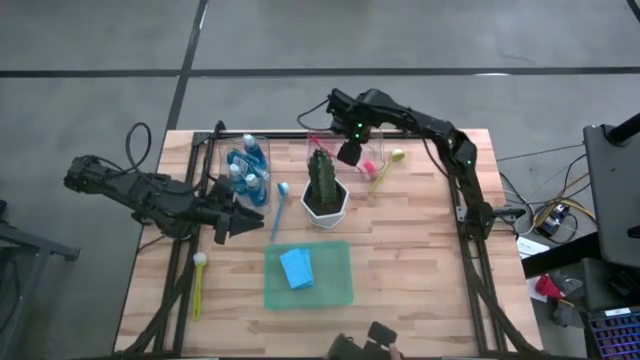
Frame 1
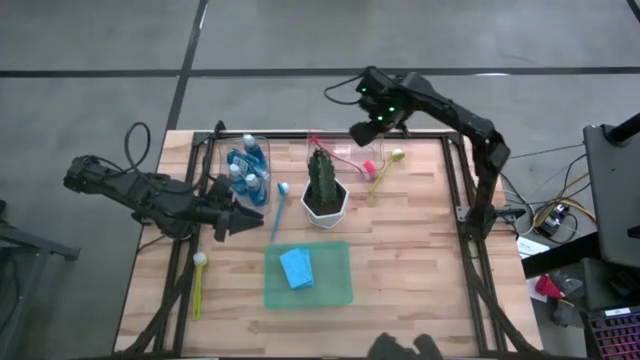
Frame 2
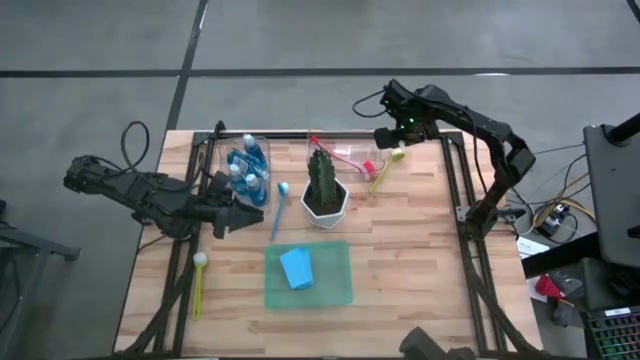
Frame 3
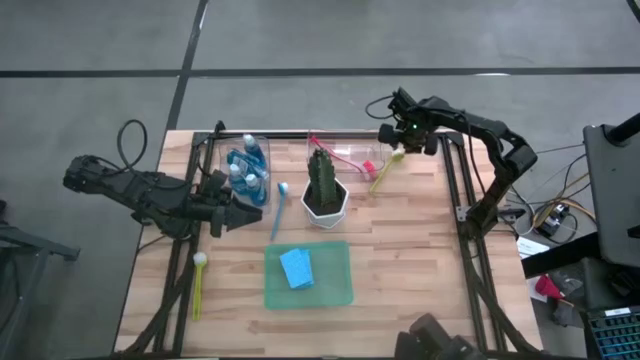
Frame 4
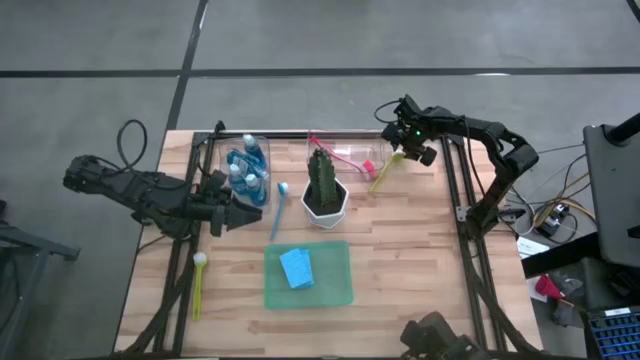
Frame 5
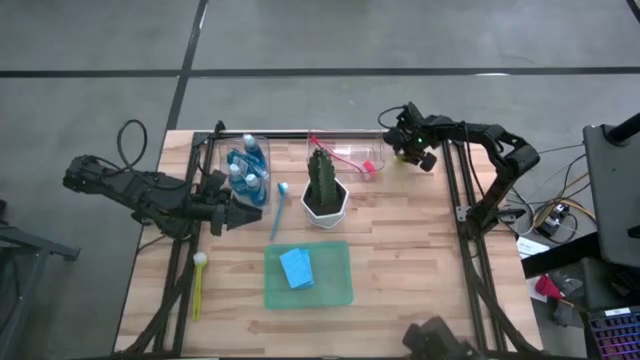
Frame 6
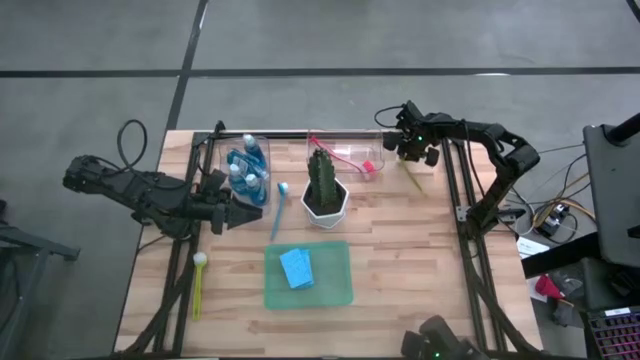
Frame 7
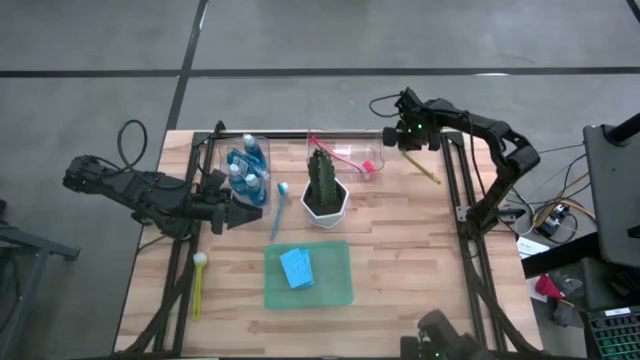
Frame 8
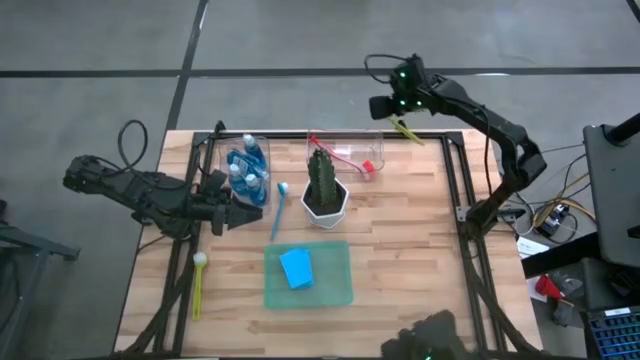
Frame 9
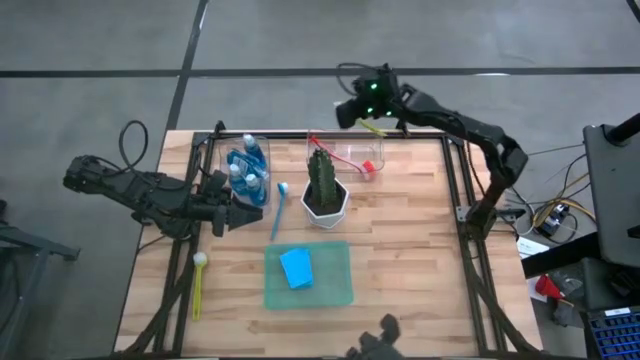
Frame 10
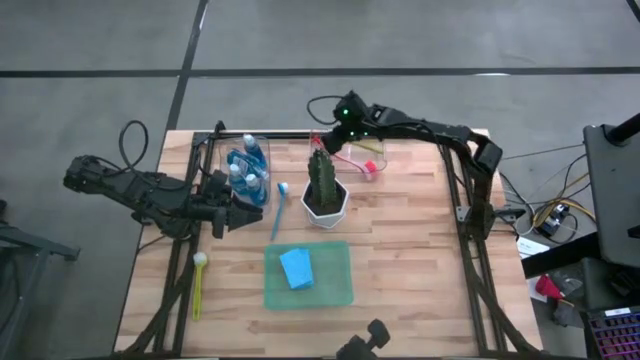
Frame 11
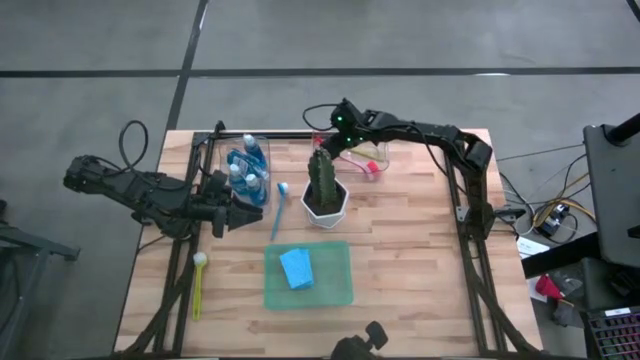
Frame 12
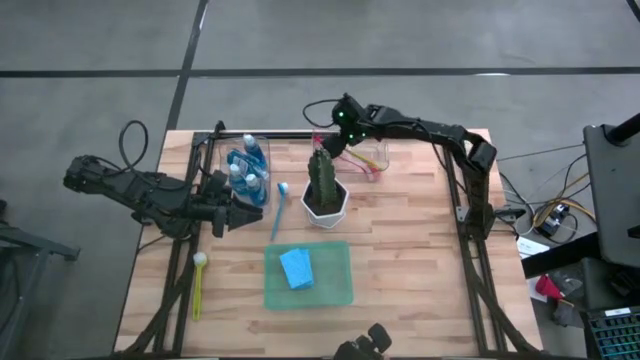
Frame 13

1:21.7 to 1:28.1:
Task: Pick & Place Kitchen Sink Supplies
Put the green dish brush into the right transparent bin

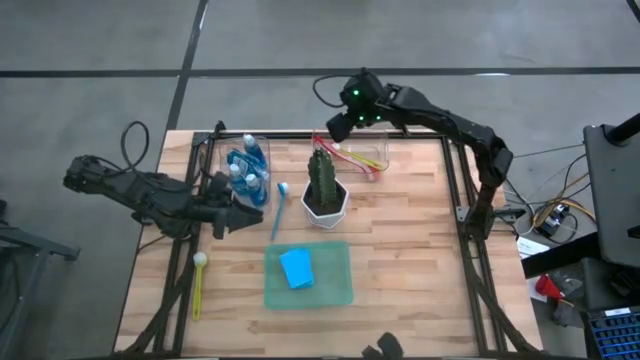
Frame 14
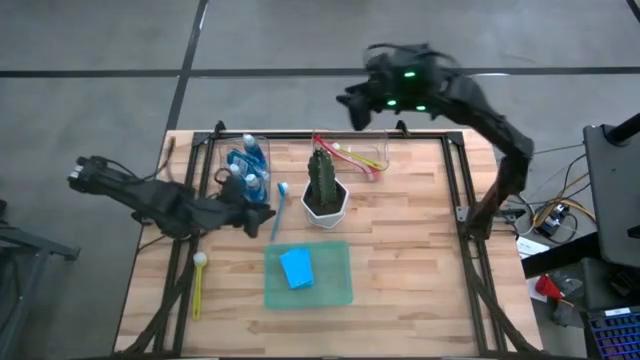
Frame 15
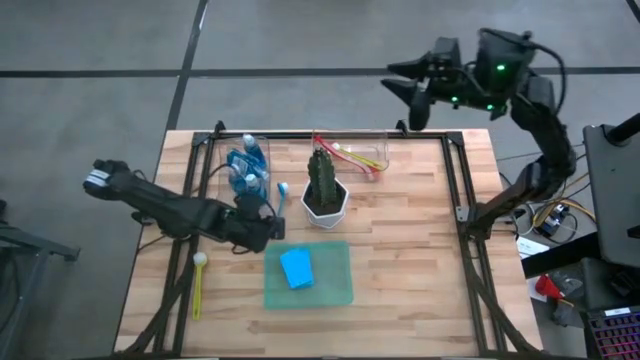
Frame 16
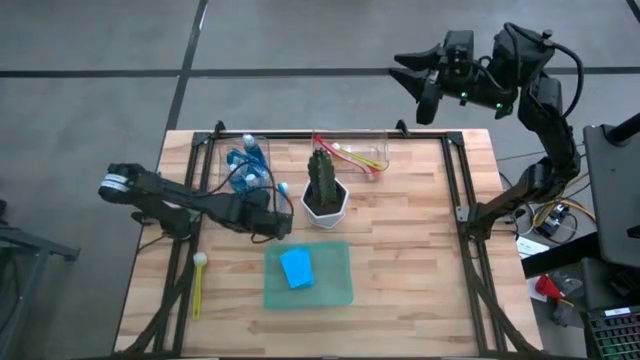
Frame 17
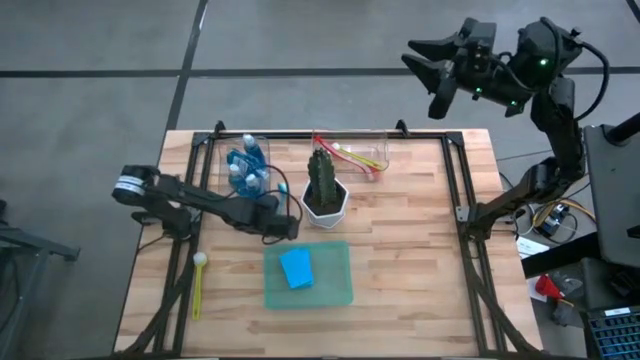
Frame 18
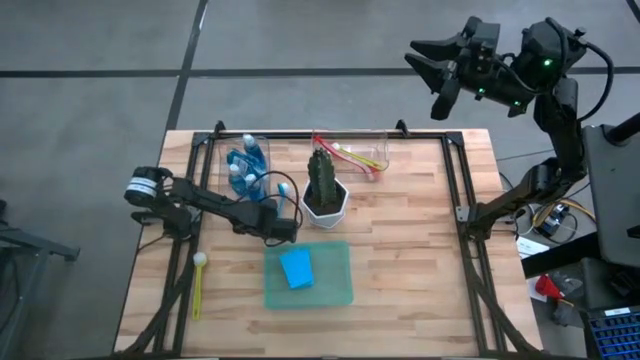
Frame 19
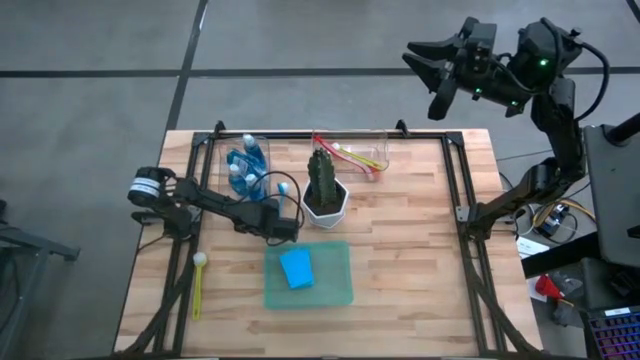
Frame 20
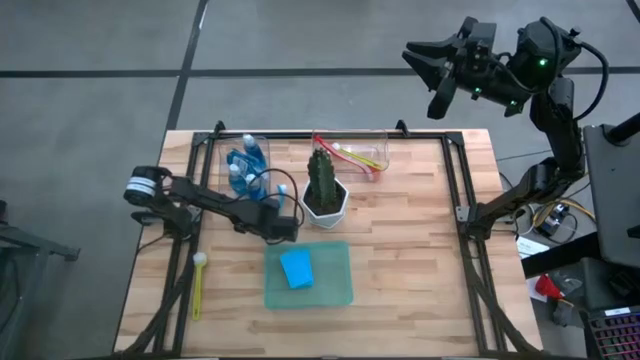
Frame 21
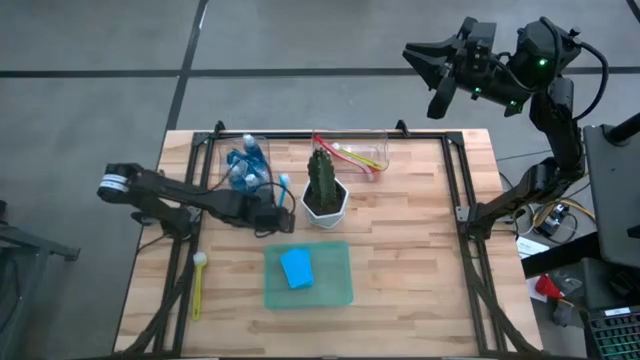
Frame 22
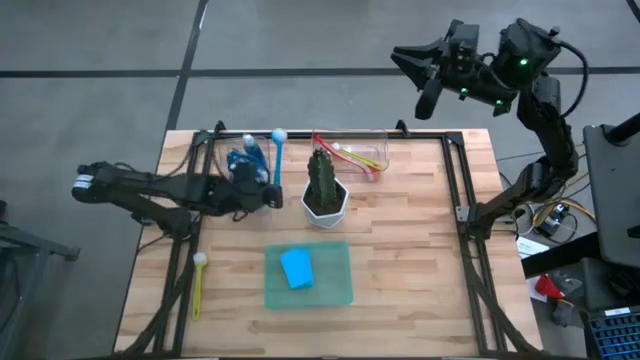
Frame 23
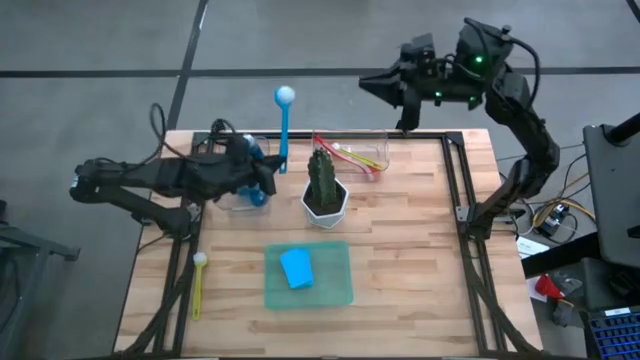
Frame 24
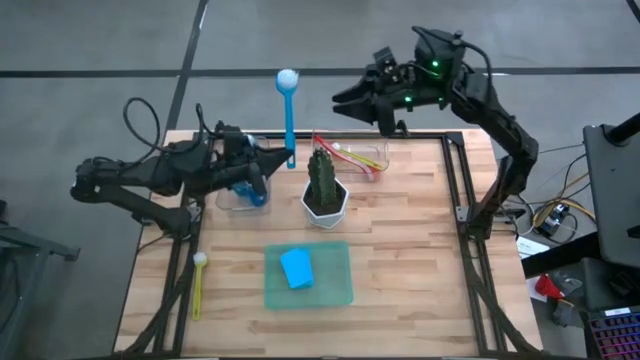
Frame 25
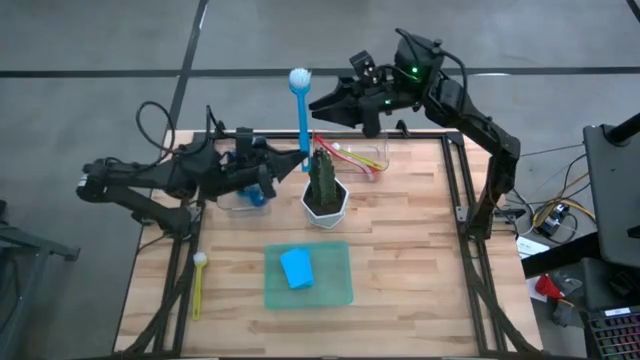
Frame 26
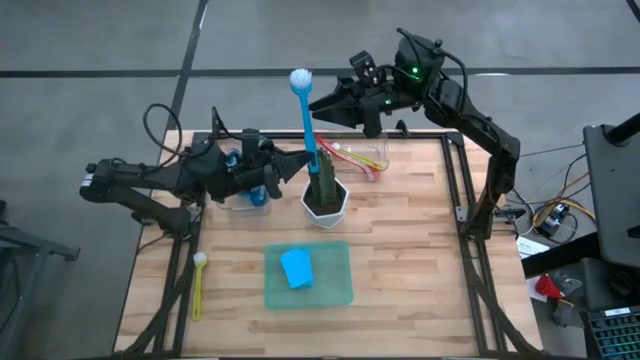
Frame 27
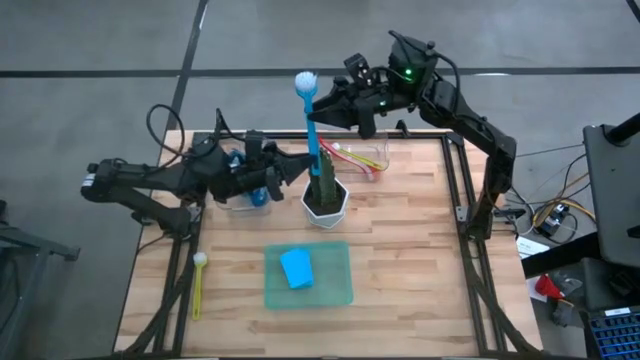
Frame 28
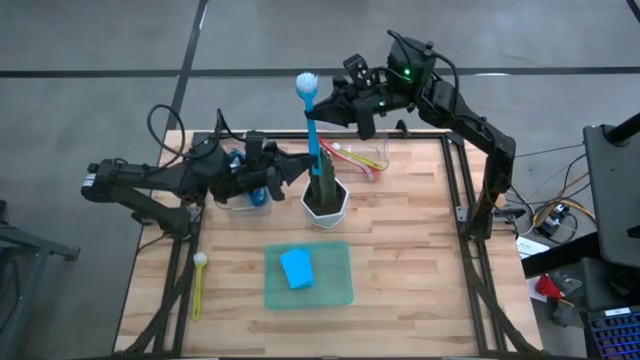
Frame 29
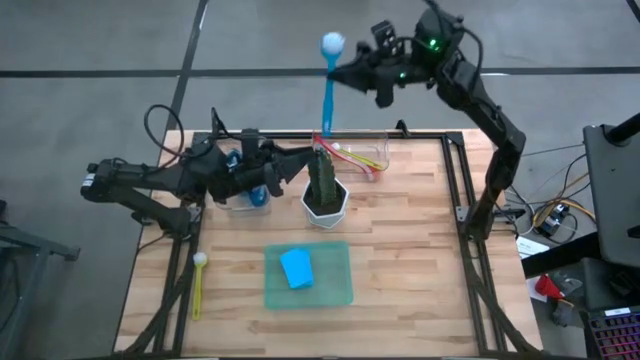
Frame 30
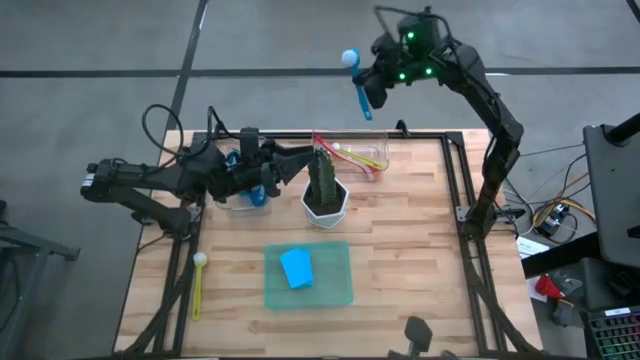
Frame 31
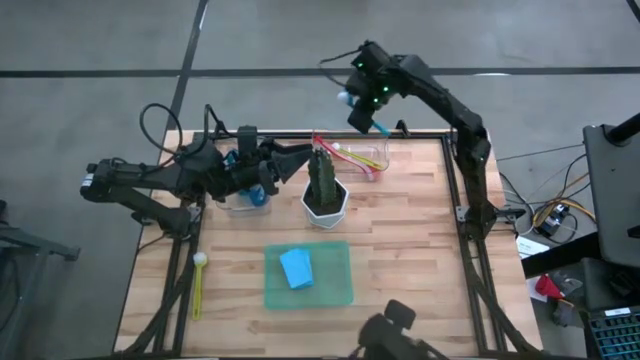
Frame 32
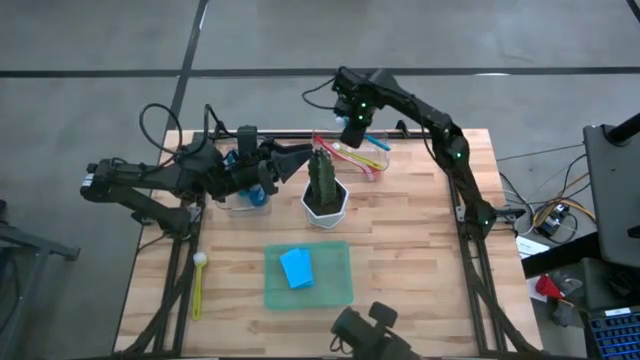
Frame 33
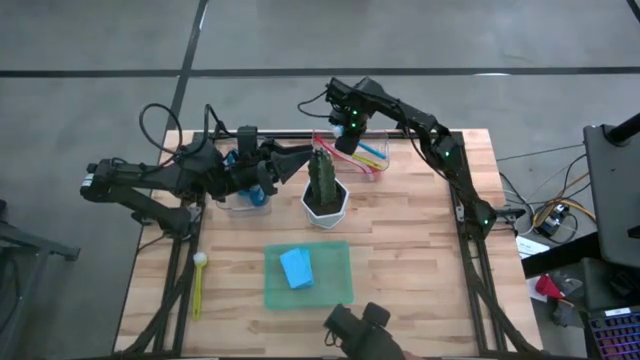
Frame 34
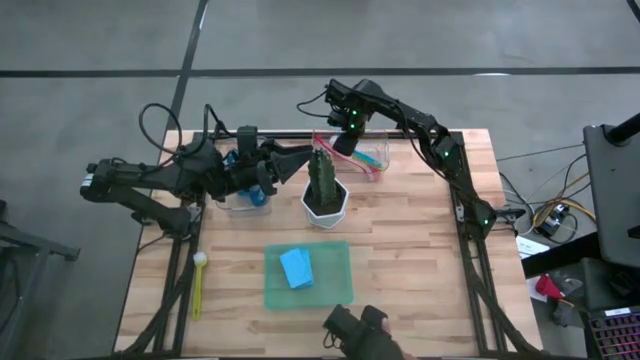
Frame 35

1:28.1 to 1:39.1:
Put the blue dish brush into the right transparent bin

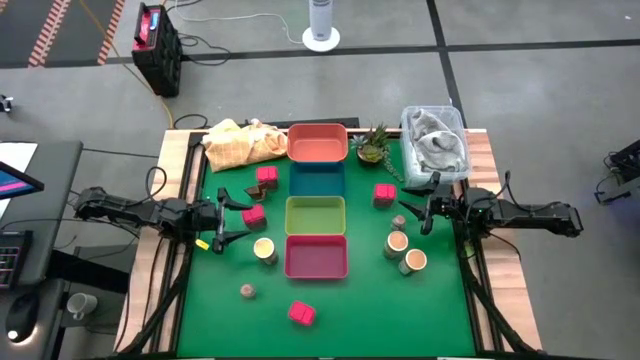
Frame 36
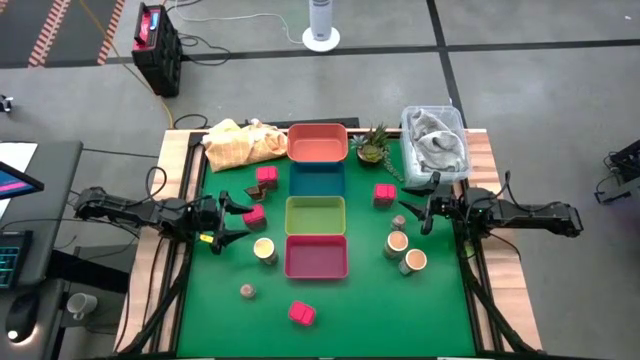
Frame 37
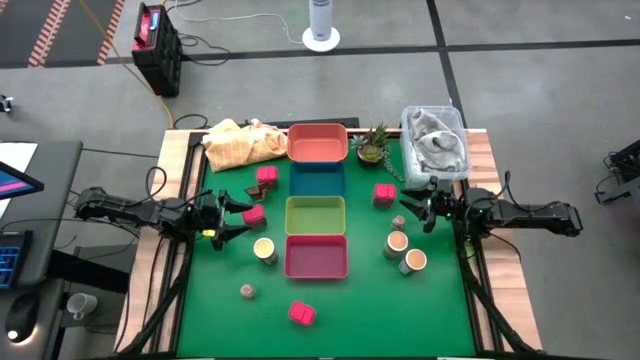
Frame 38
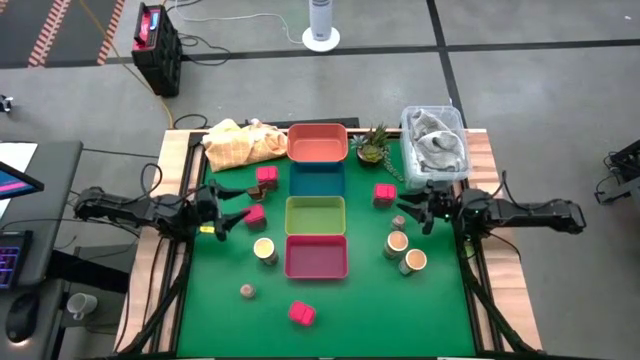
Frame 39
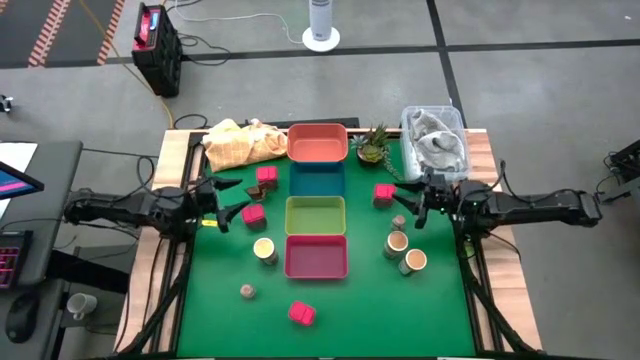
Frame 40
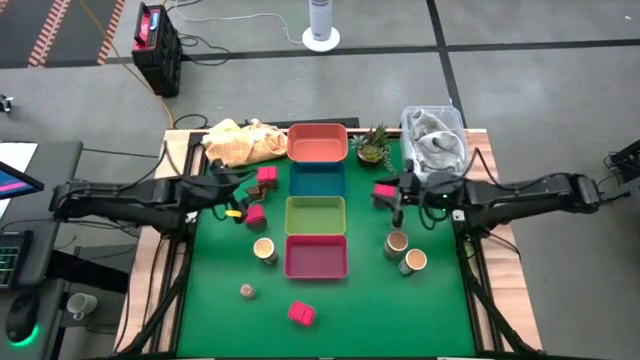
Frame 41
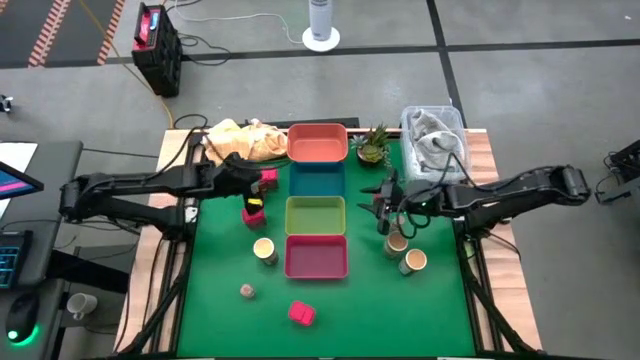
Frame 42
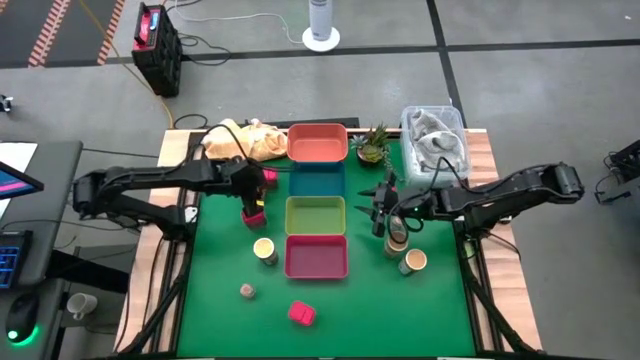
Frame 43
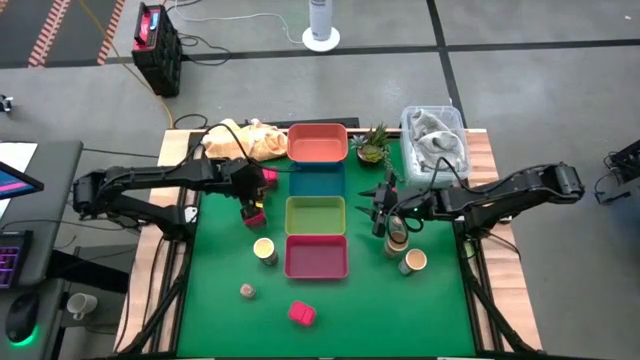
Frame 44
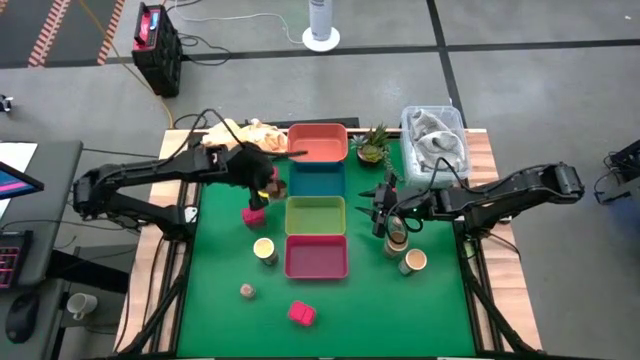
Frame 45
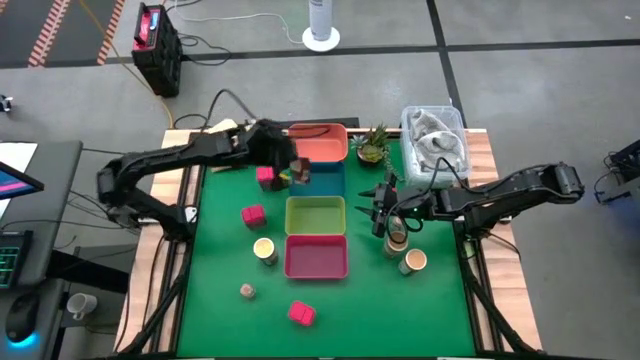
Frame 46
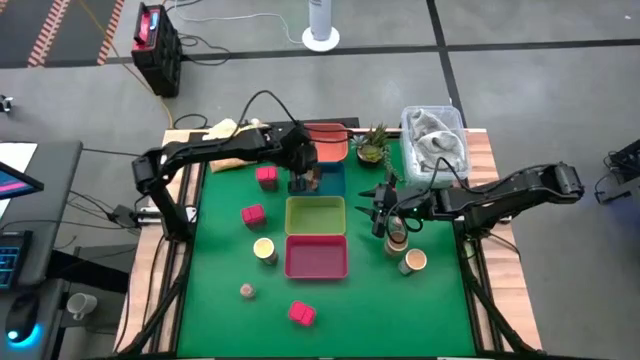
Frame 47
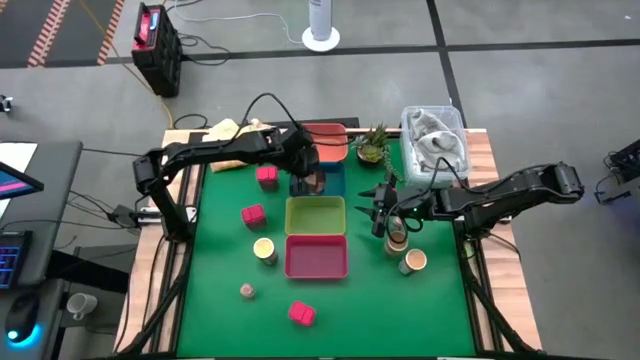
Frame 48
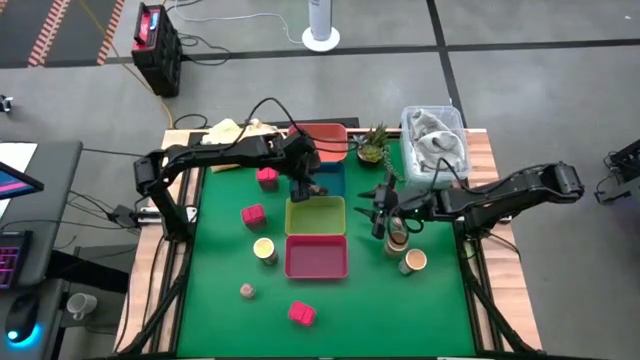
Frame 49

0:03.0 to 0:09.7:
Task: Sort spices by type
Put the orange seasoning bag into the blue bin
